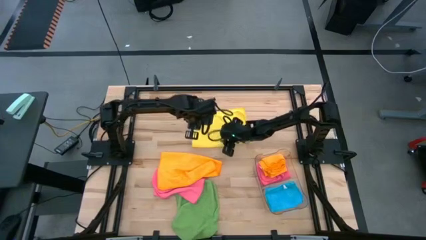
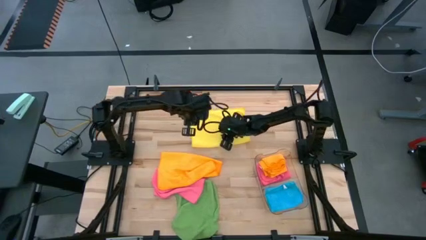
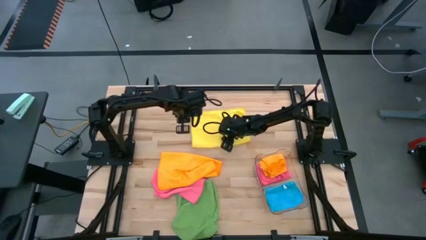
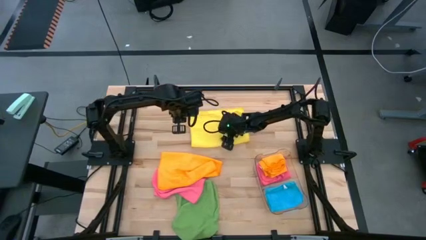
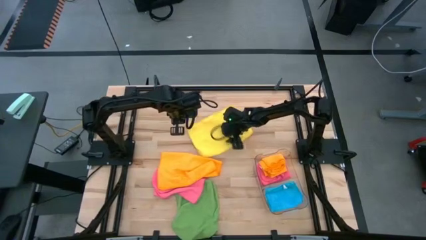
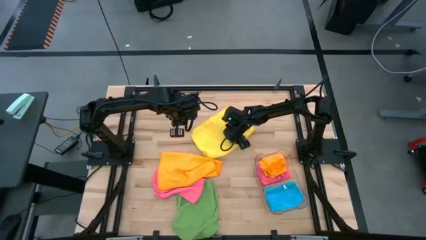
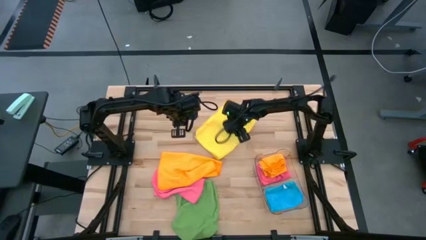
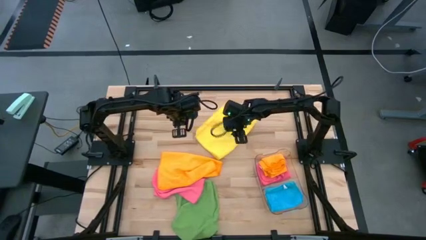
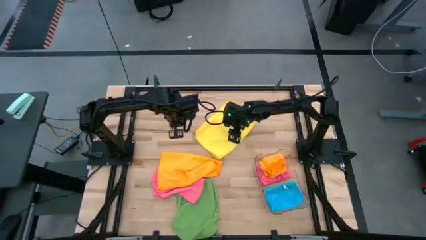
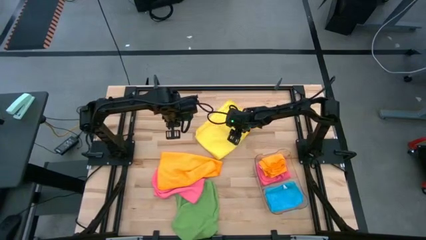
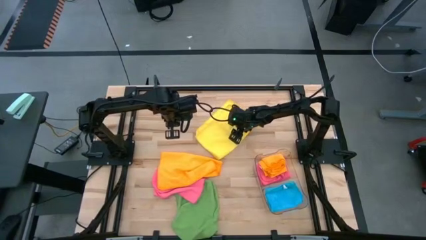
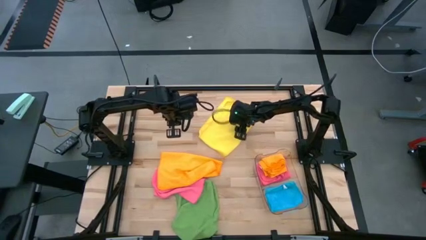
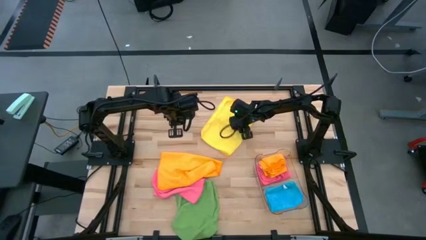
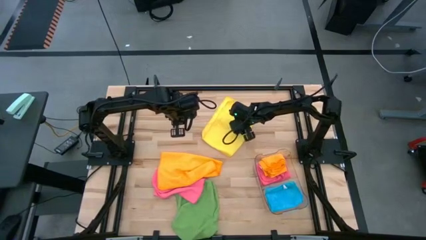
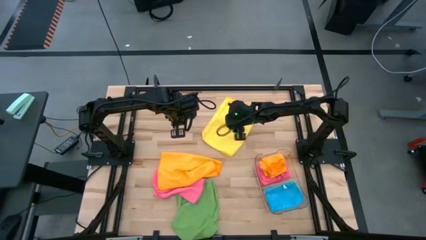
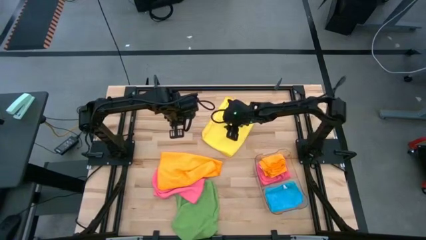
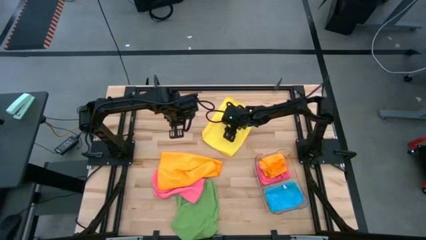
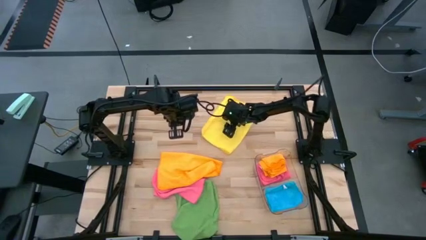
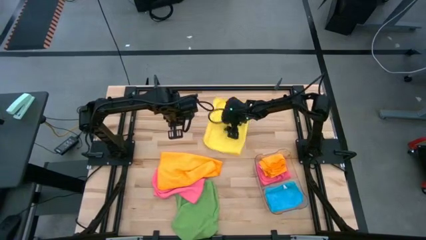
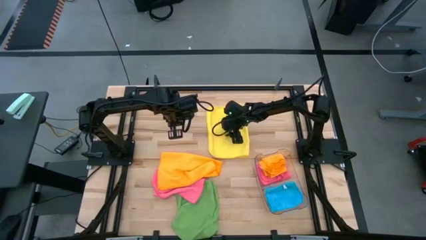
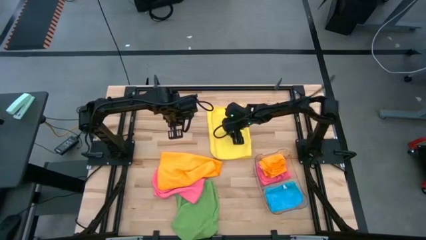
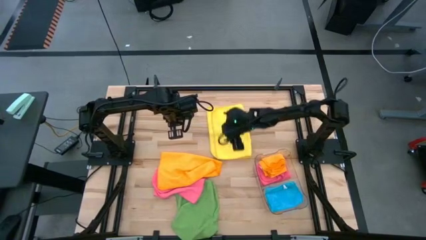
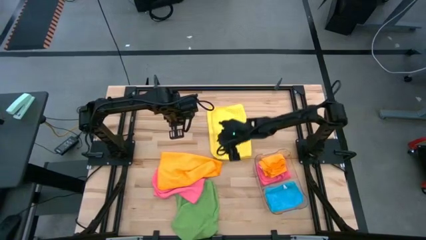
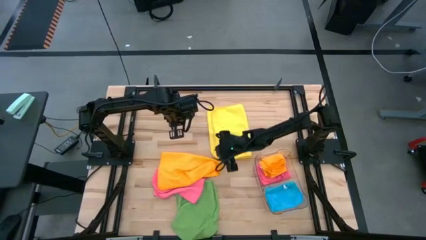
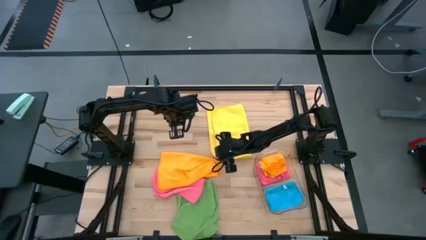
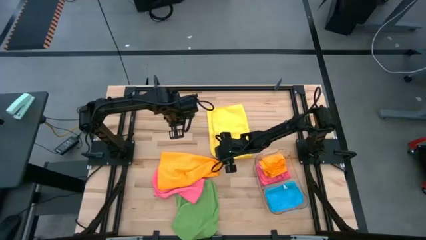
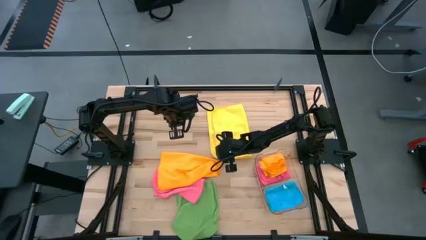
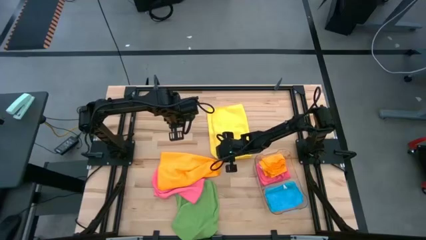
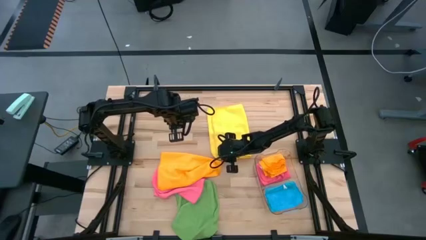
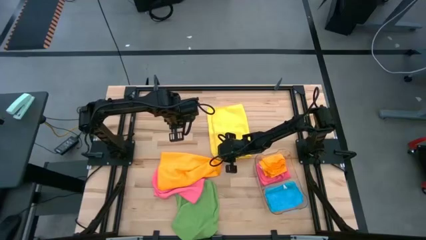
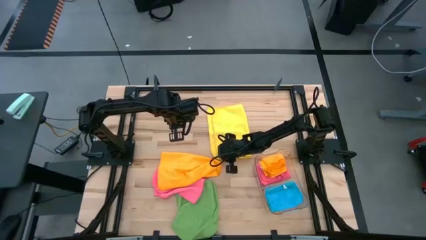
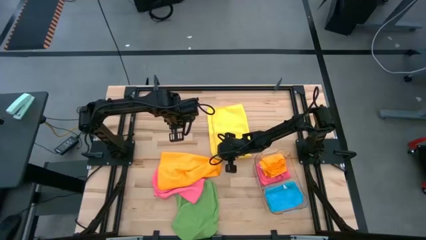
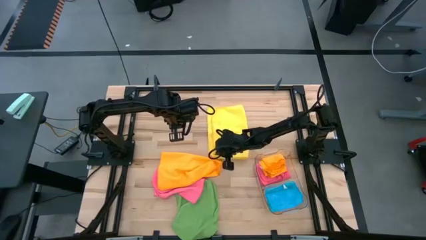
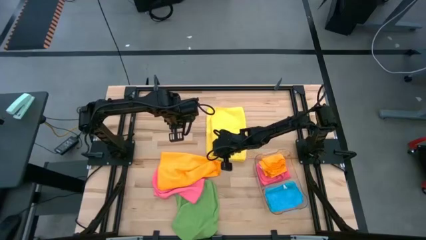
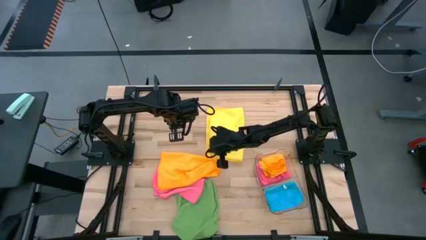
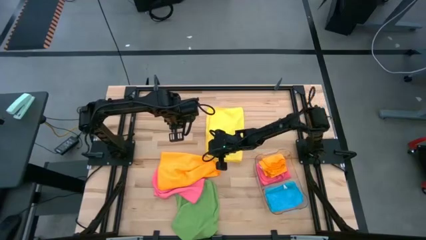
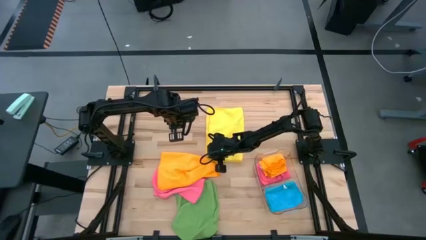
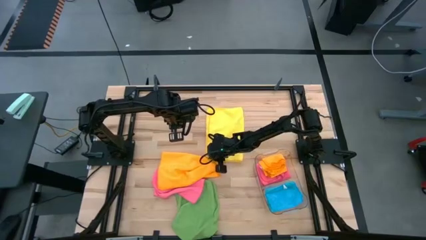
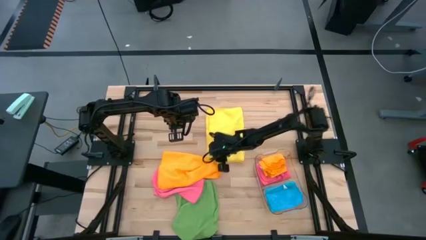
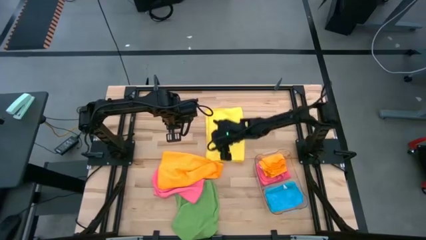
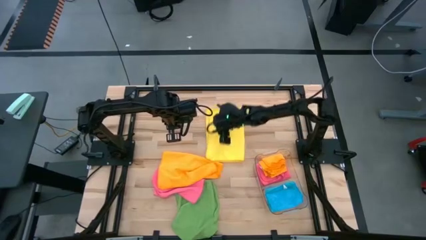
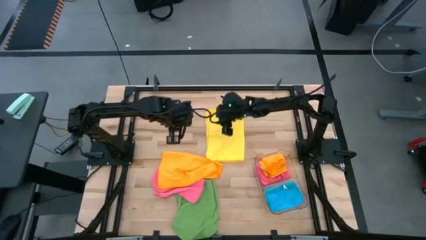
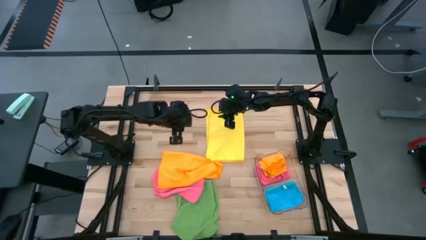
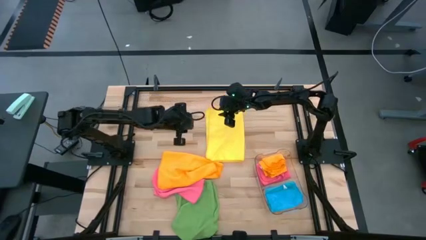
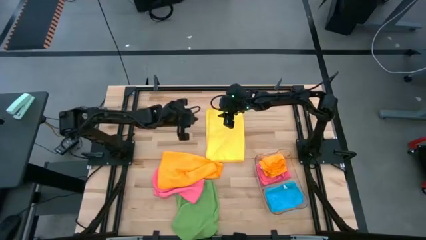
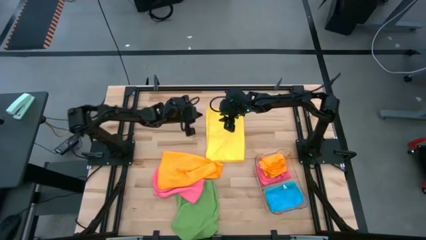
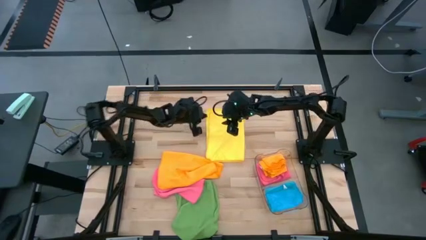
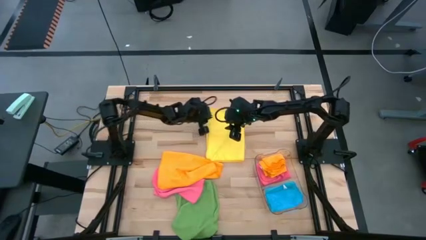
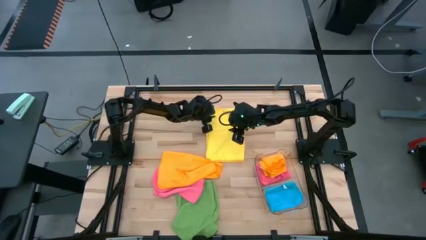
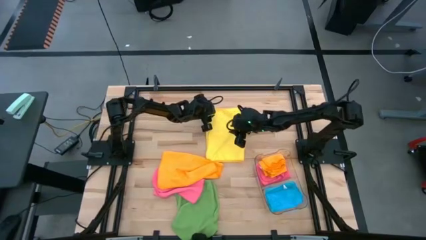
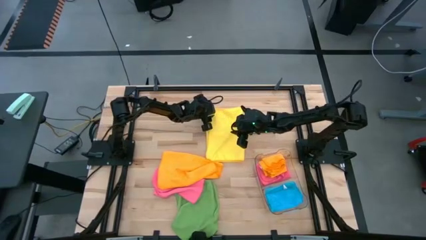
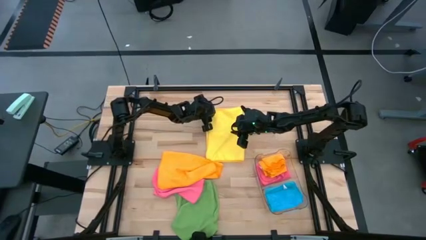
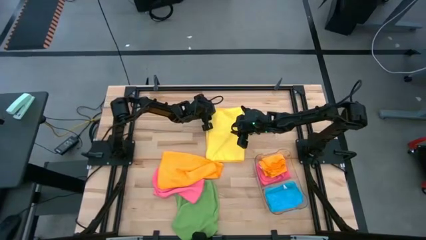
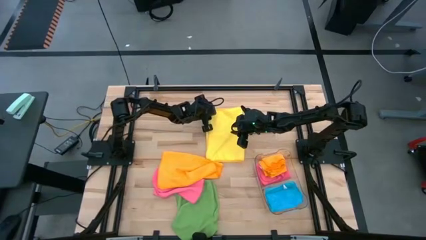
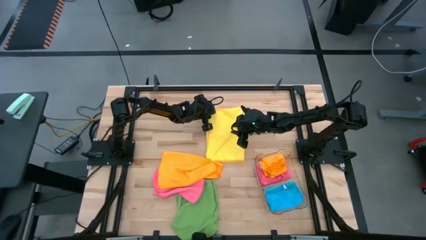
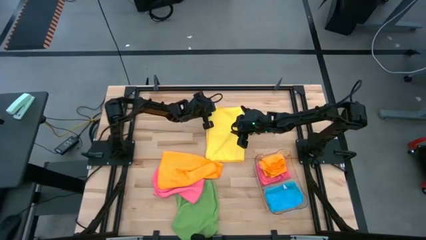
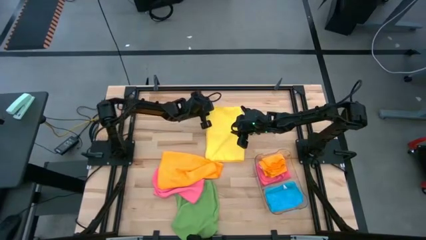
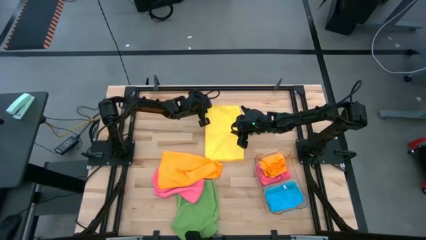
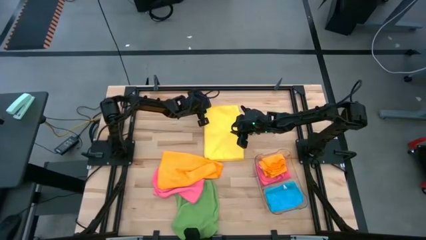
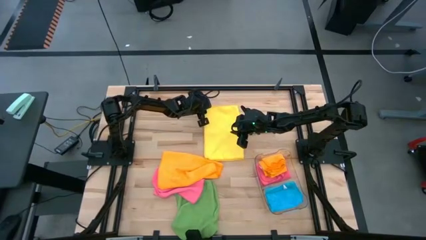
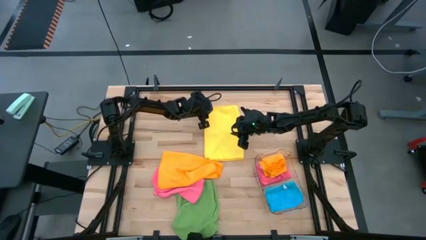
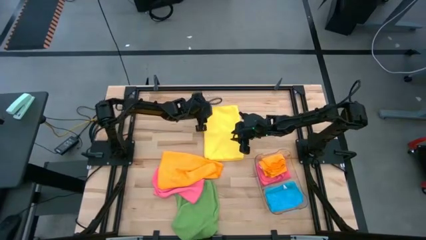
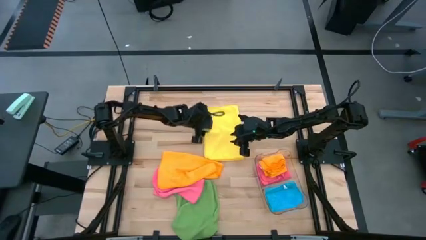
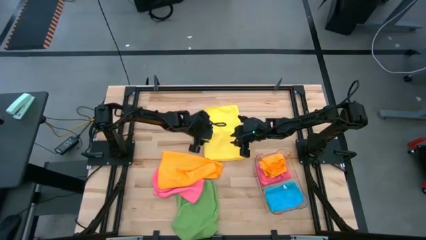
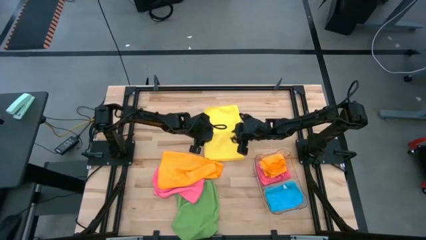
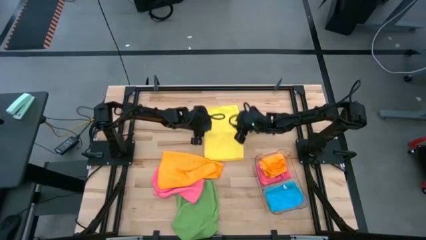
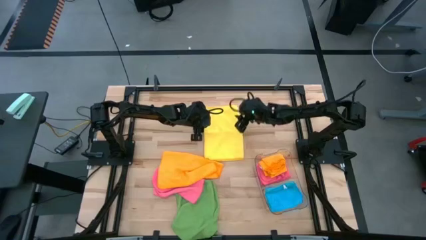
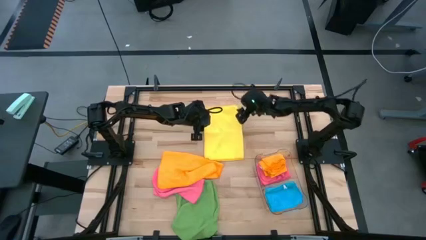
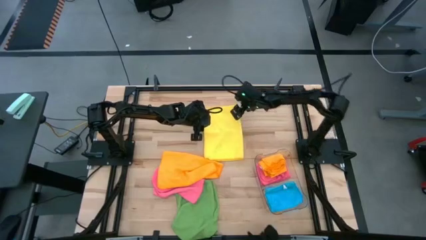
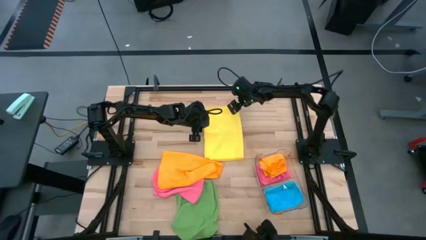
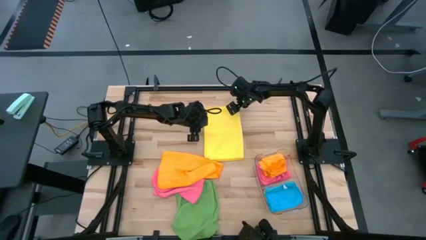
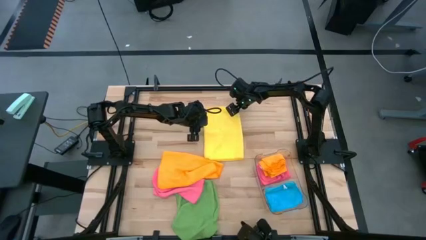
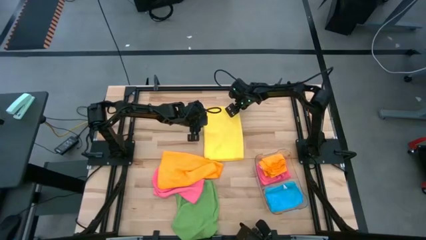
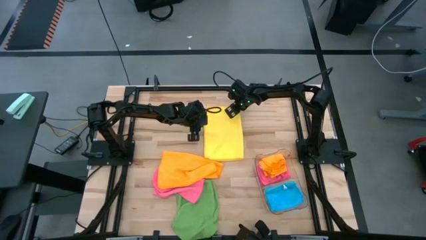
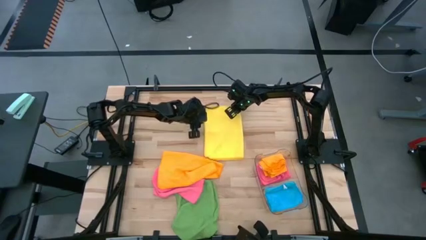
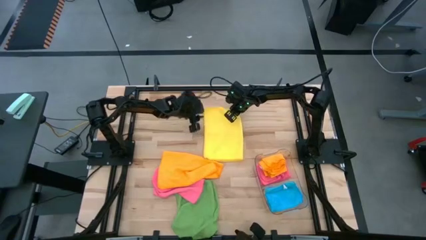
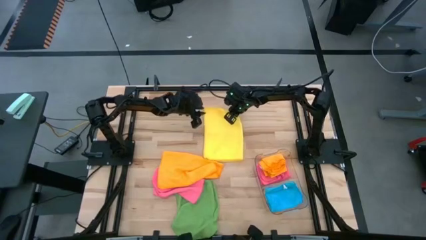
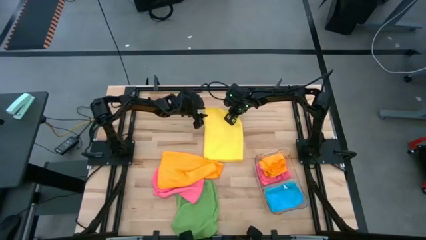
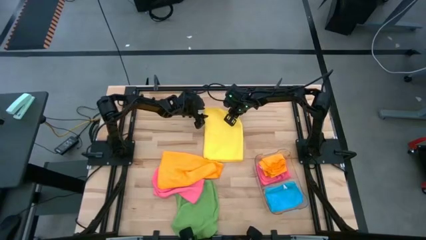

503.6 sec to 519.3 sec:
Task: Fold microfiber towels
Fold the yellow towel
